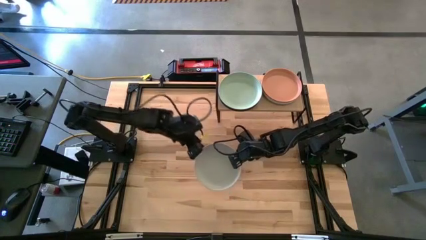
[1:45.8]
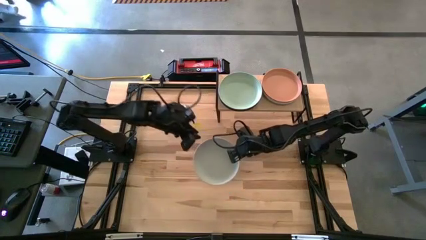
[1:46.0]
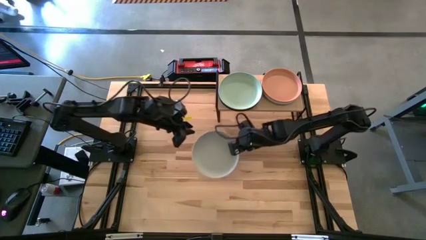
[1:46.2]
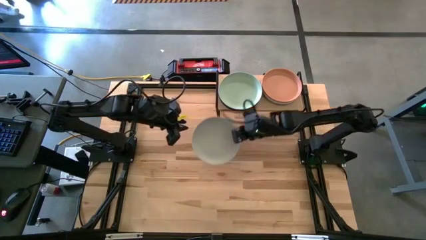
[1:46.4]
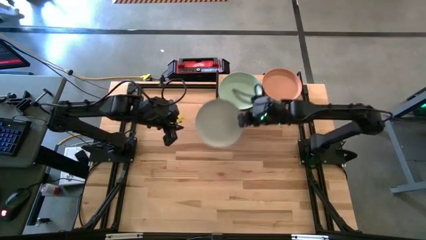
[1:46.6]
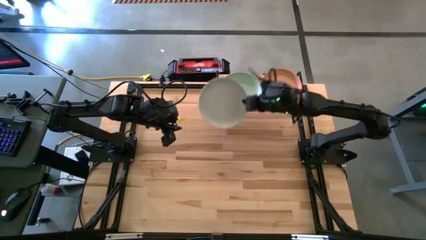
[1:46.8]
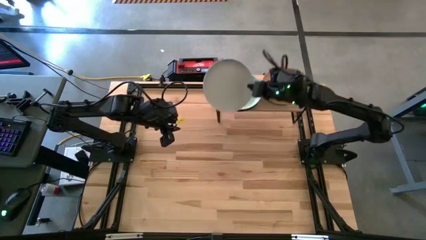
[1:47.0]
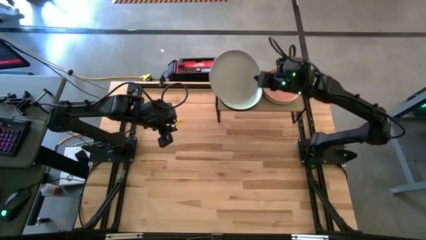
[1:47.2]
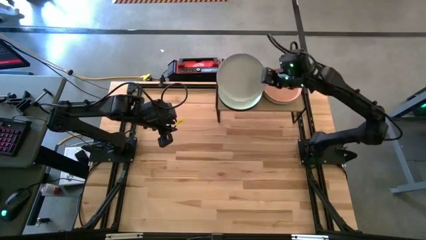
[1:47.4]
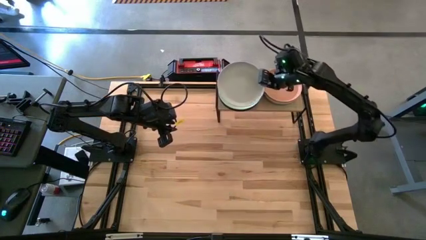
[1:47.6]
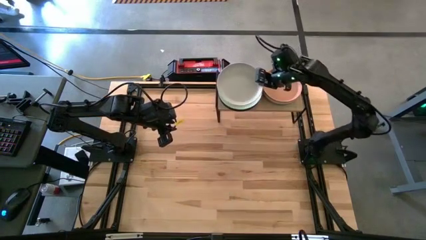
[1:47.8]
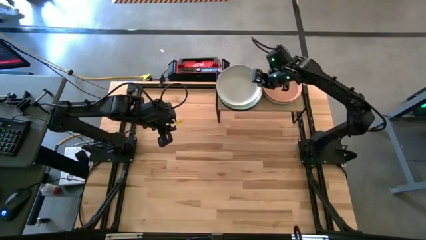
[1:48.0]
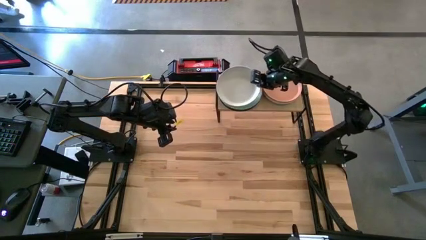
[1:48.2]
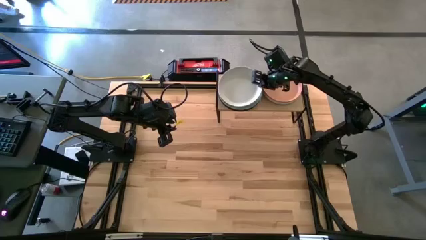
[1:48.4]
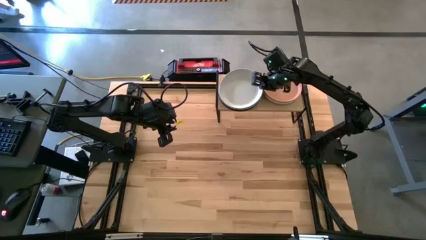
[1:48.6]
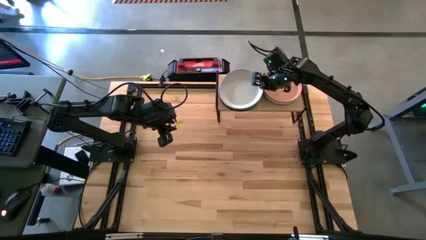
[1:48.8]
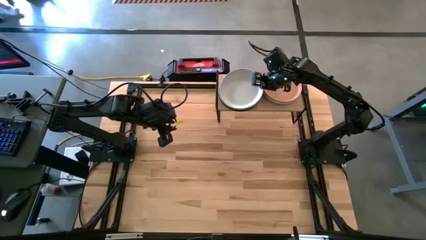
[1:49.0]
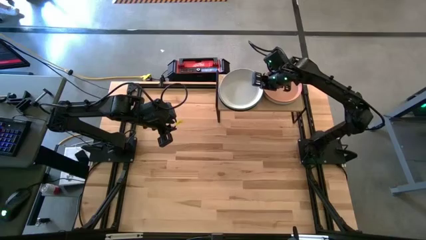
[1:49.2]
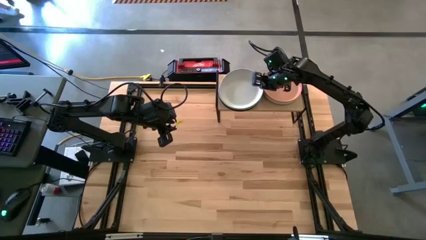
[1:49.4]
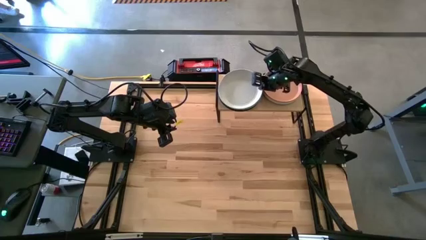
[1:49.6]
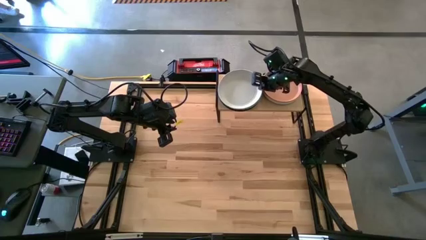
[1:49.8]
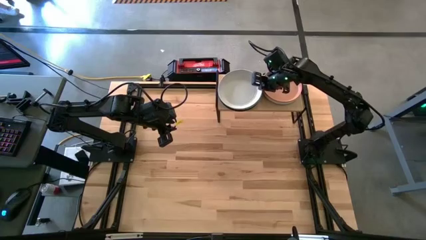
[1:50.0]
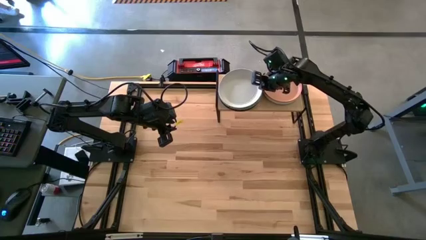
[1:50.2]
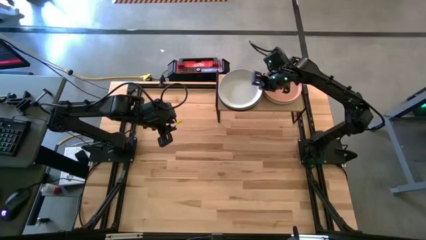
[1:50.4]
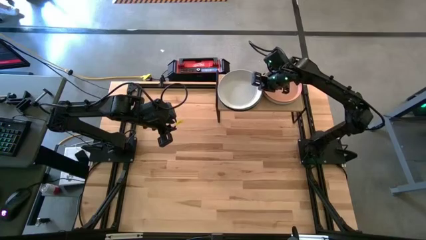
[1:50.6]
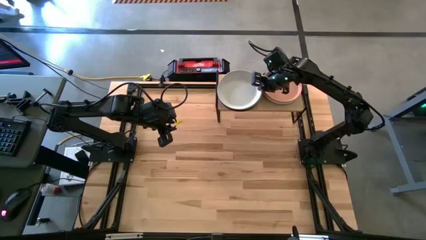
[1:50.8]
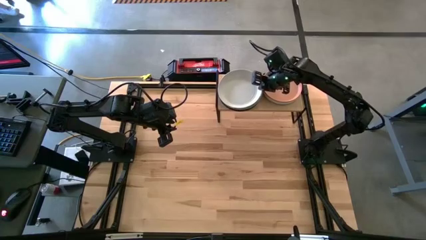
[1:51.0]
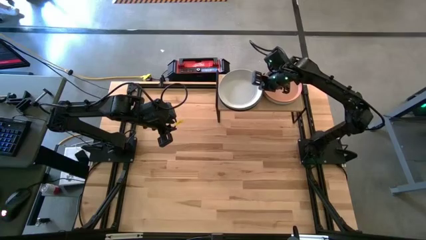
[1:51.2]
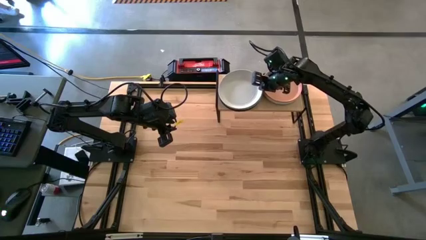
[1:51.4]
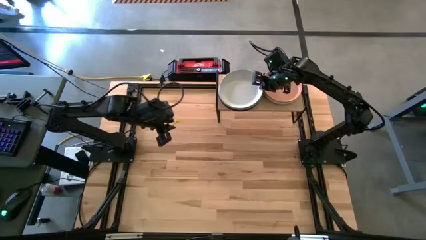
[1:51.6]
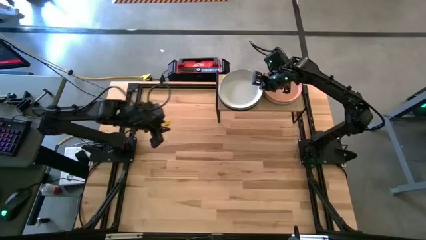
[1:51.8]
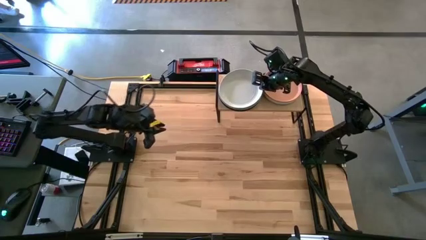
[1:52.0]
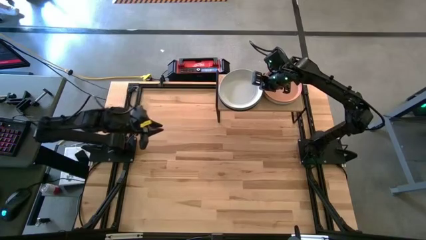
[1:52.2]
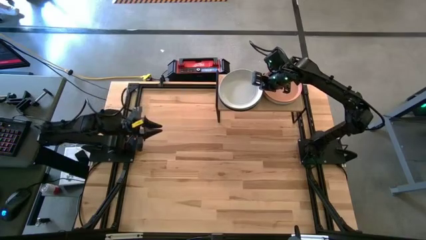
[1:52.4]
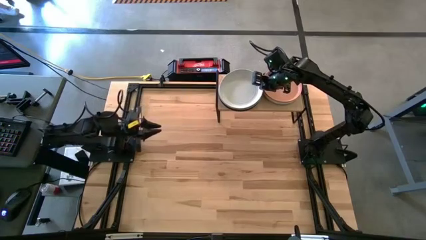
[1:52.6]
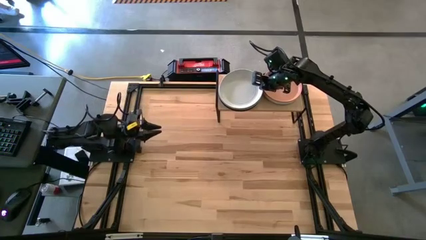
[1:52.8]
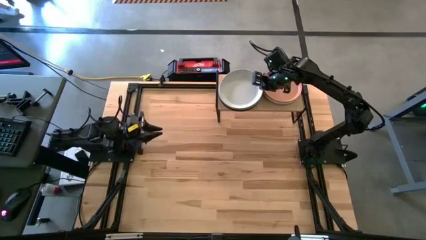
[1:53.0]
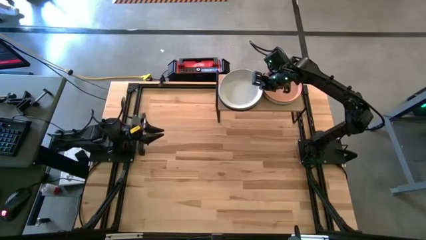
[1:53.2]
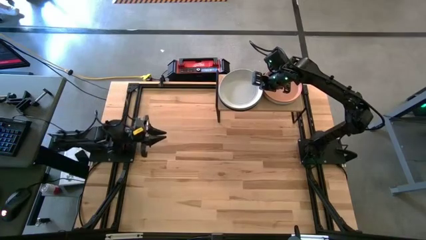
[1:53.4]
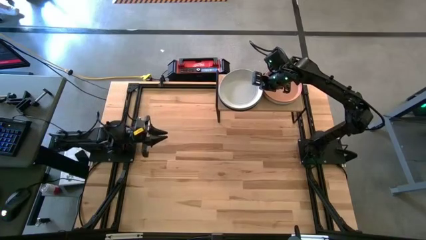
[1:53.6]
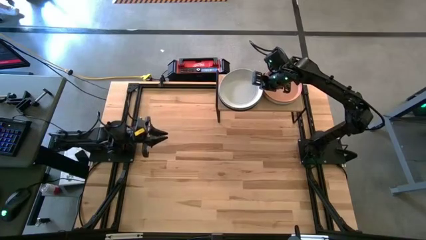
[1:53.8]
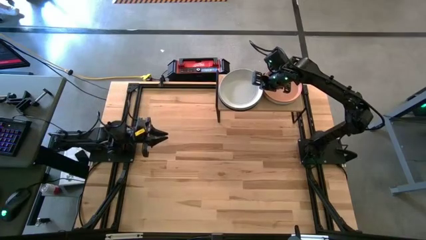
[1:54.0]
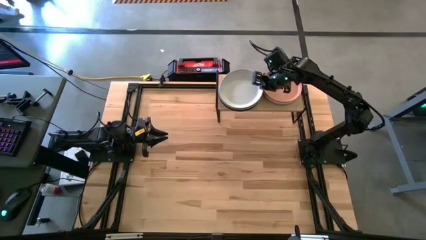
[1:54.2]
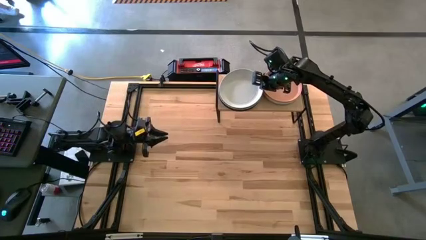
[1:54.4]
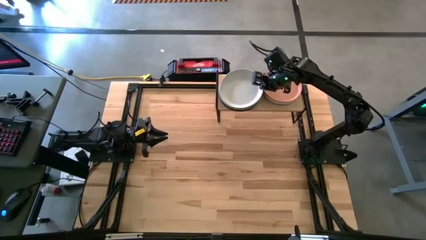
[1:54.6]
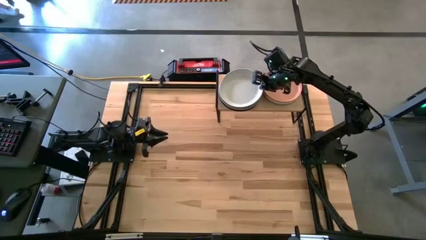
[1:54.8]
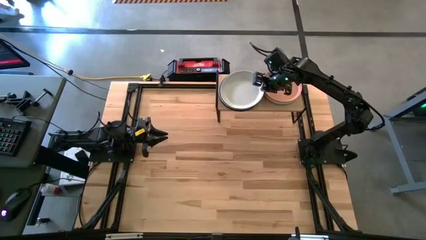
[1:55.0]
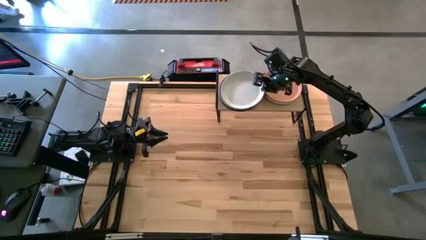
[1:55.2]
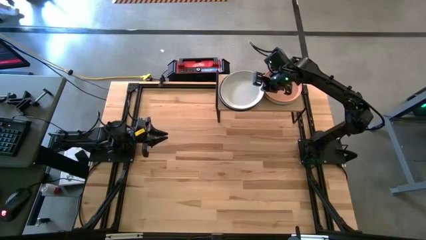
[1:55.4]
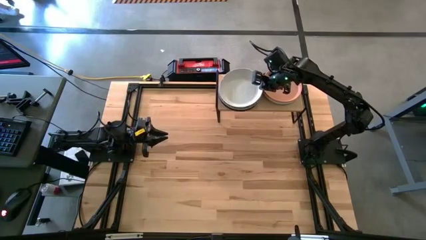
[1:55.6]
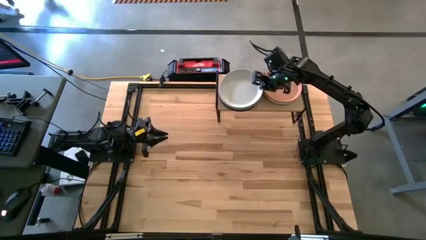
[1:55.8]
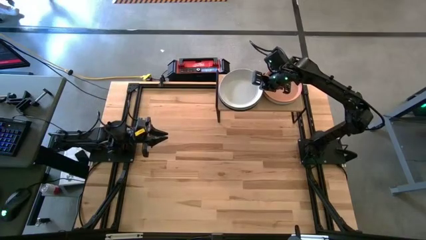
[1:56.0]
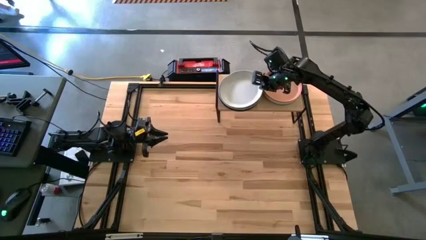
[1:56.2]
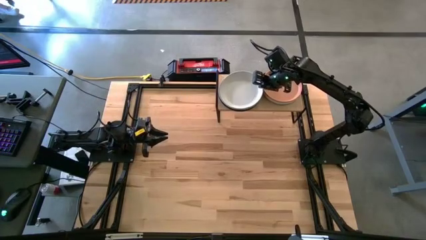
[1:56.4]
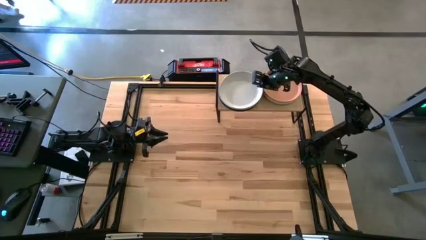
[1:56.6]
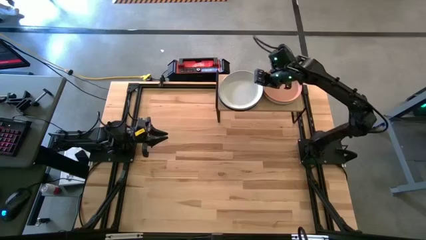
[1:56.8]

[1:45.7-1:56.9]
Task: Place and stack plates onto a shelf
Stack the gray plate on top of the light green plate on the shelf

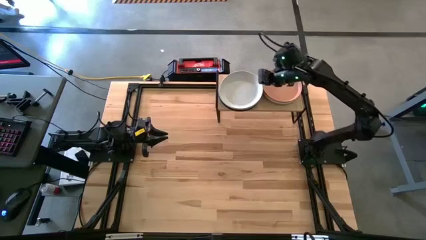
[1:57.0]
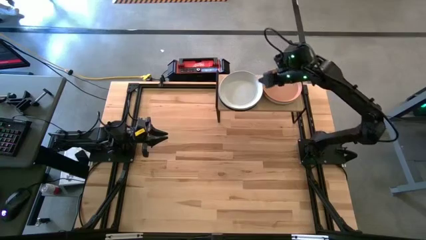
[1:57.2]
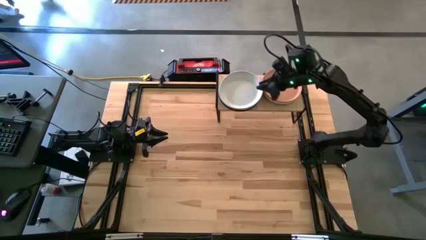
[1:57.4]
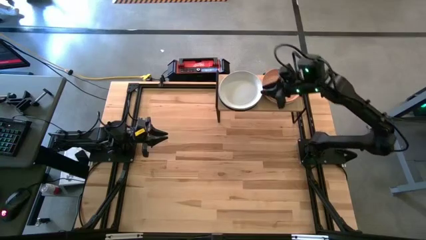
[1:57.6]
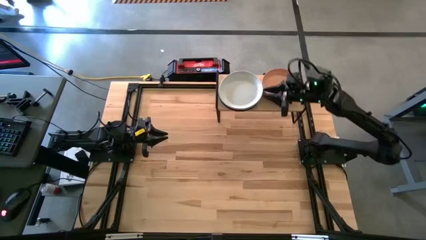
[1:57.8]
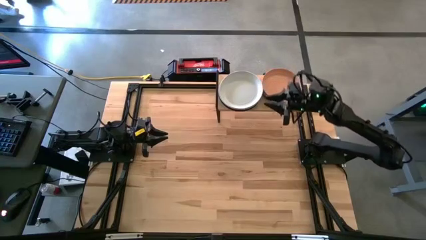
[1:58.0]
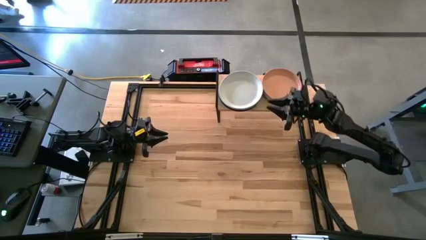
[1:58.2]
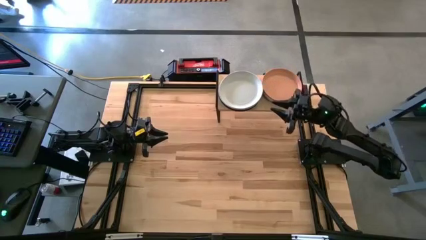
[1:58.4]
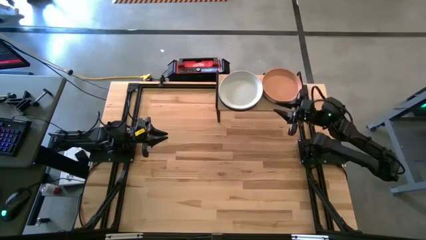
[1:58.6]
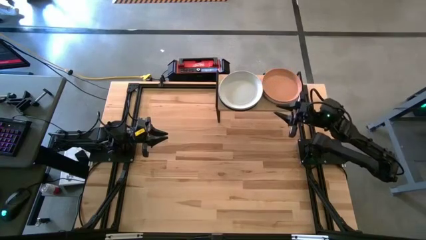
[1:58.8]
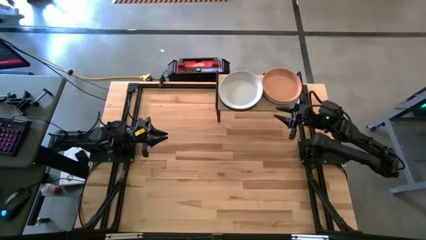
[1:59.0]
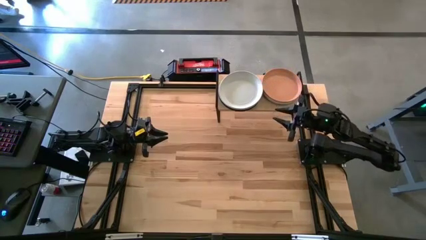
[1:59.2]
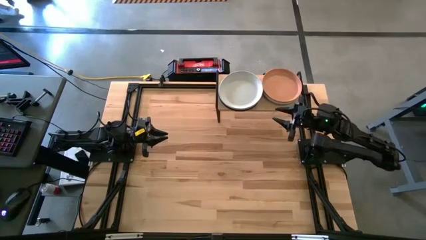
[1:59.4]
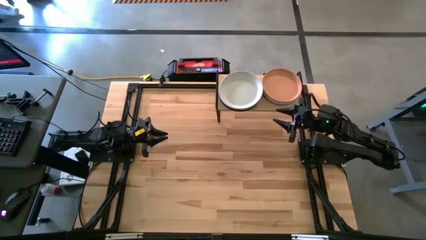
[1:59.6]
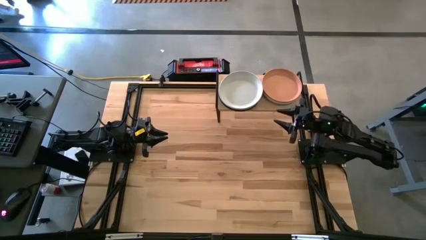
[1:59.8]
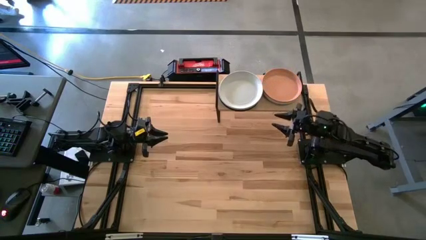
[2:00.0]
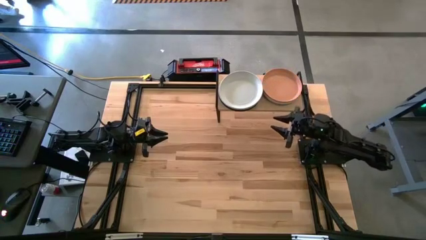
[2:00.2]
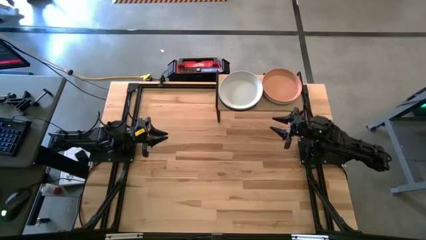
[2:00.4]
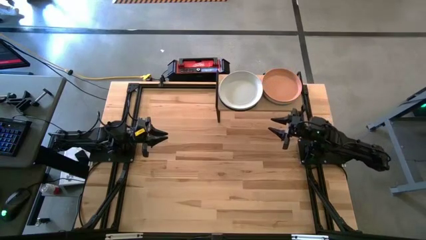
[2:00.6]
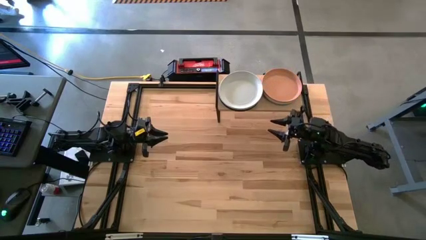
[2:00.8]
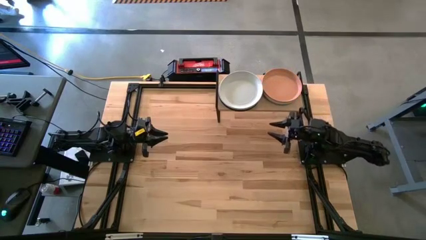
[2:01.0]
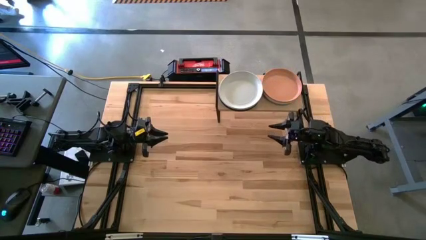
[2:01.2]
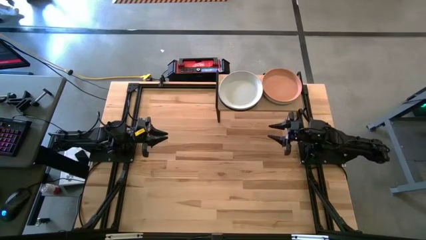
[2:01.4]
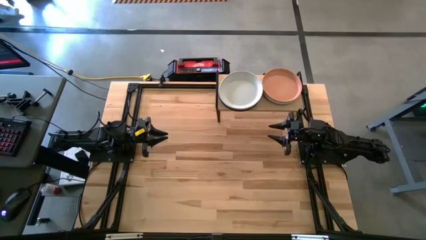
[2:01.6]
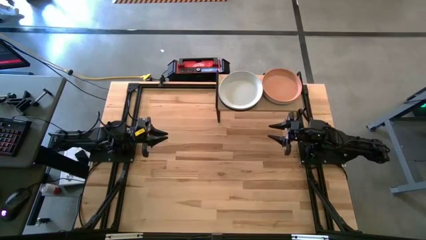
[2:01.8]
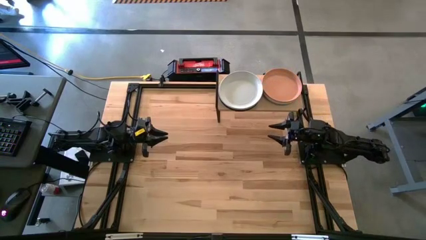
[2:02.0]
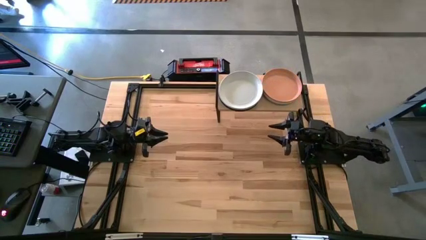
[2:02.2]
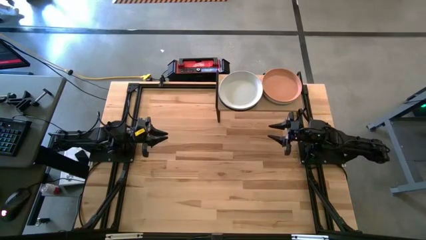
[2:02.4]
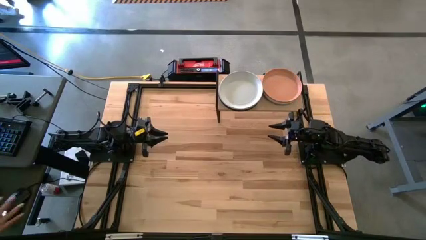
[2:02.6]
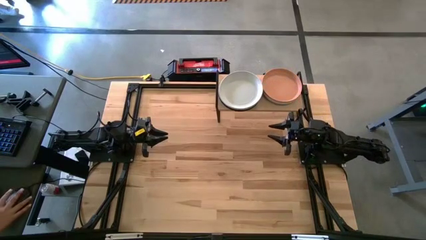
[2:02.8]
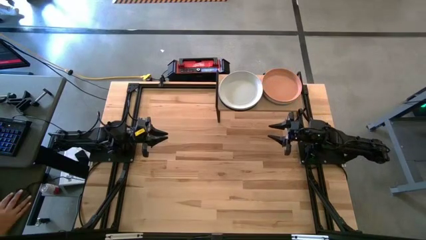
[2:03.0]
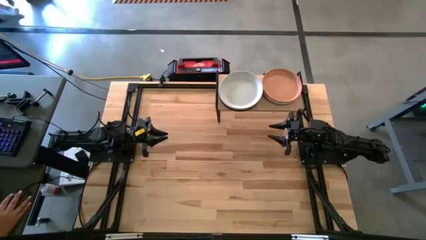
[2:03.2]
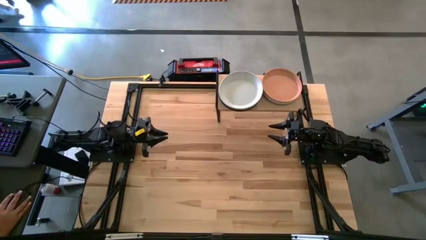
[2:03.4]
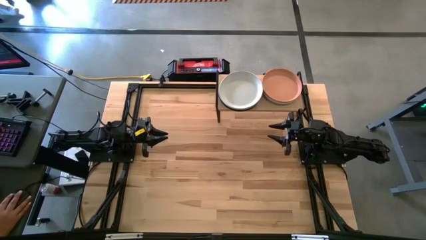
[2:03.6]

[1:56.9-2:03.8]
Return to Home Position
